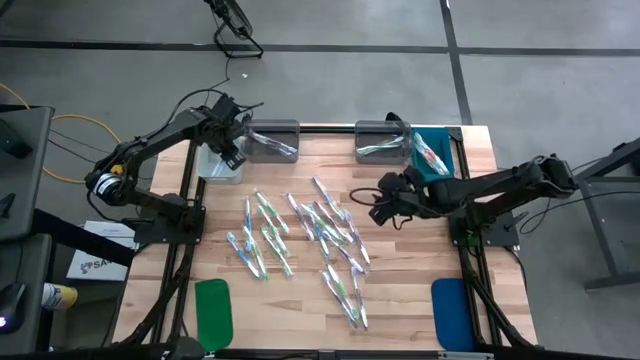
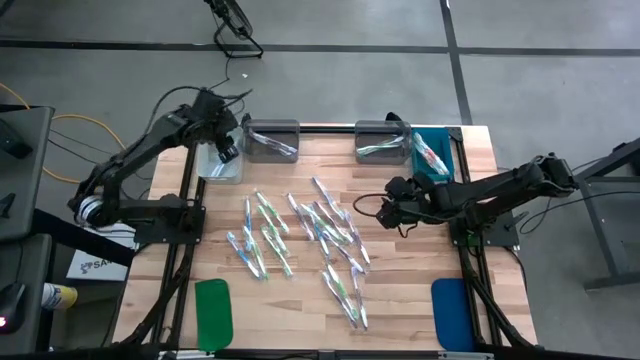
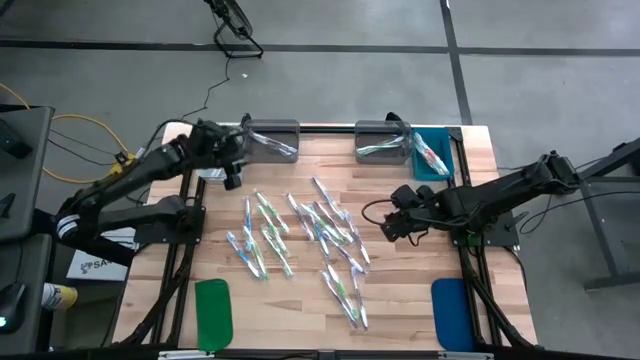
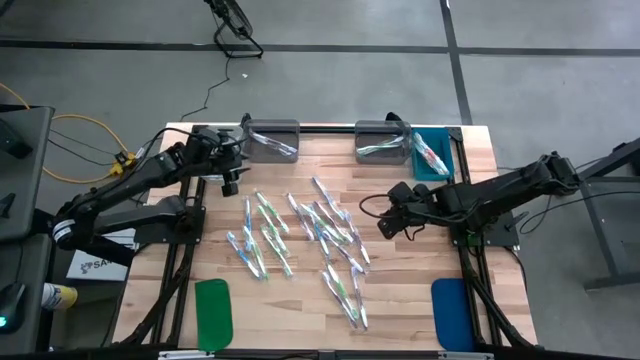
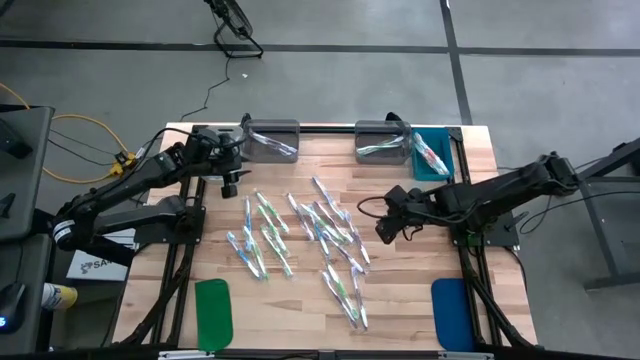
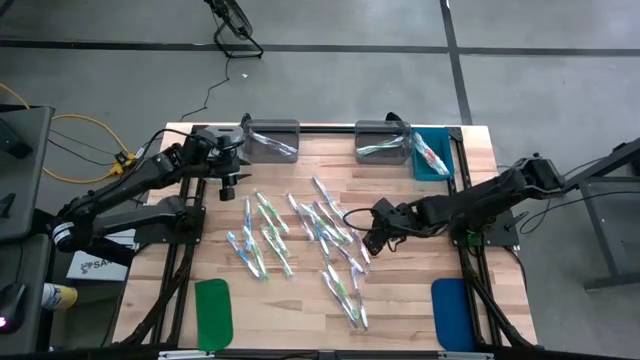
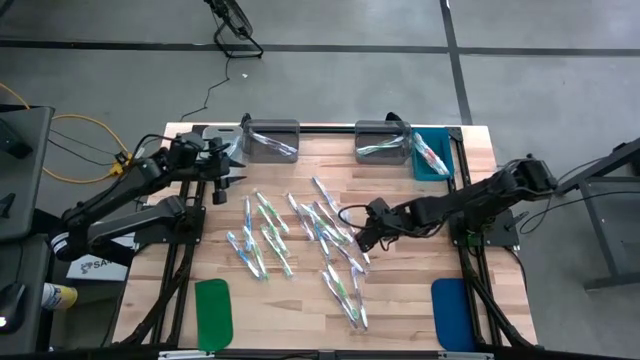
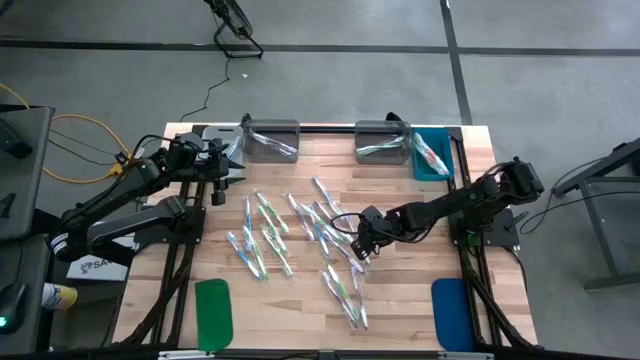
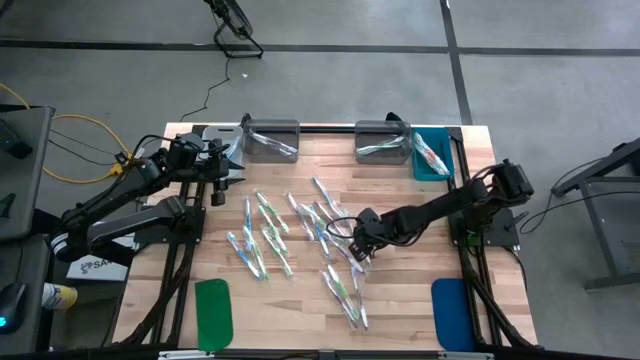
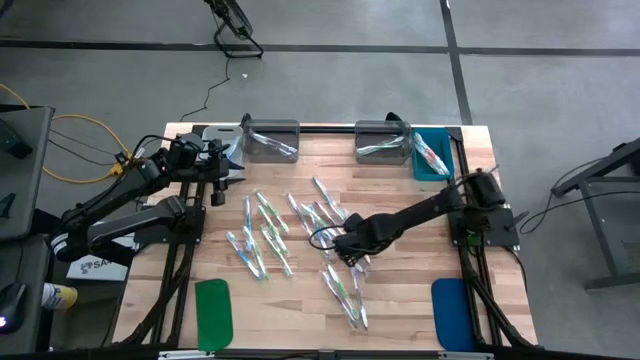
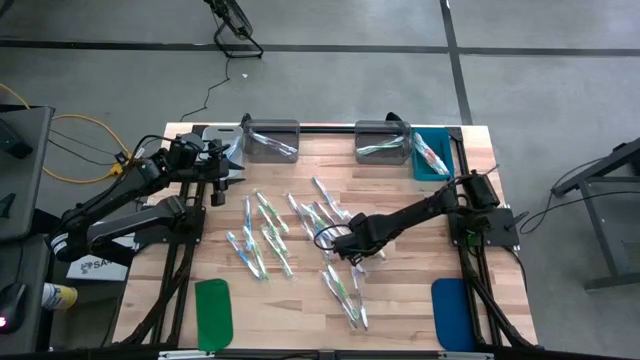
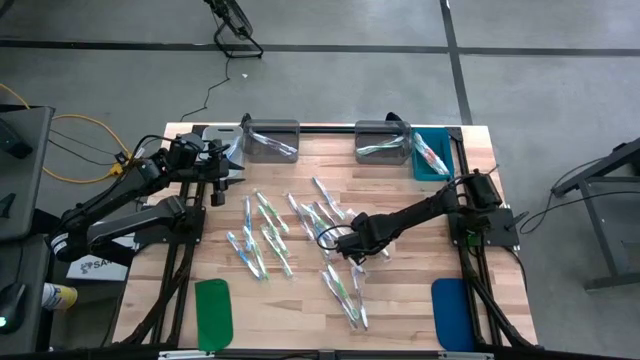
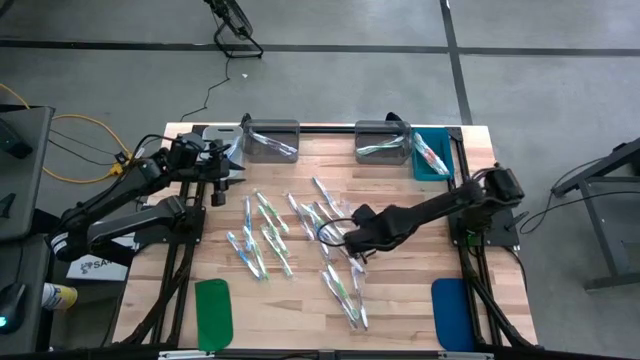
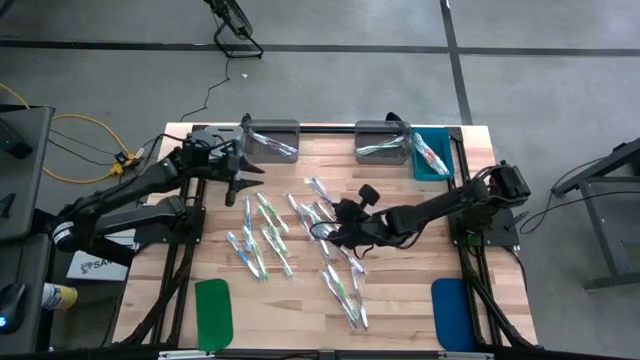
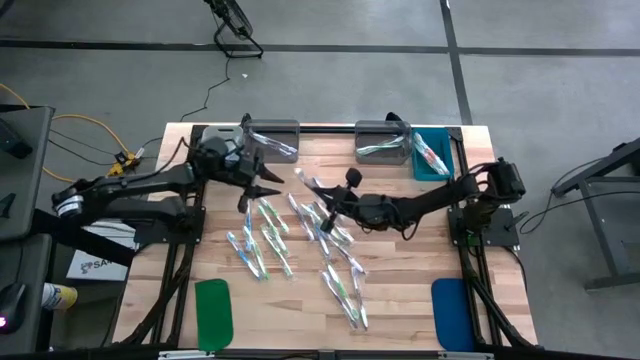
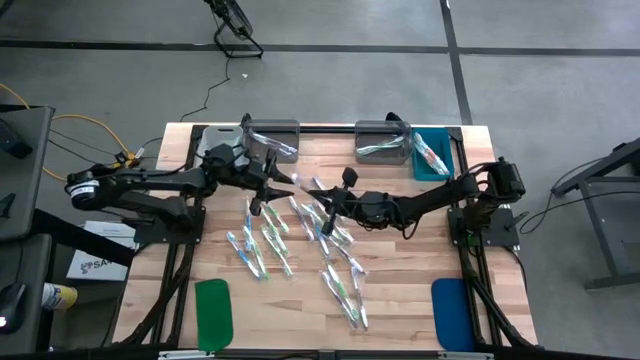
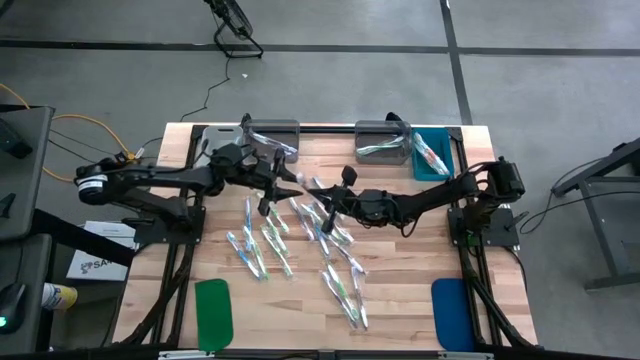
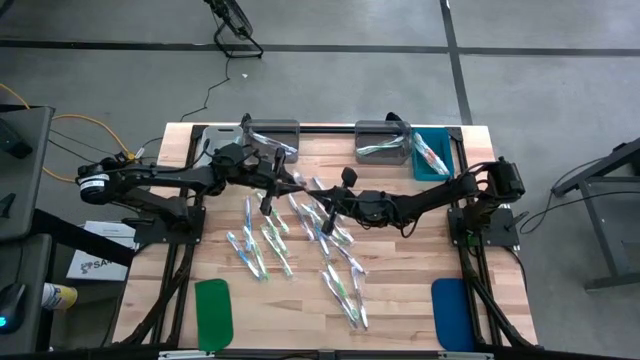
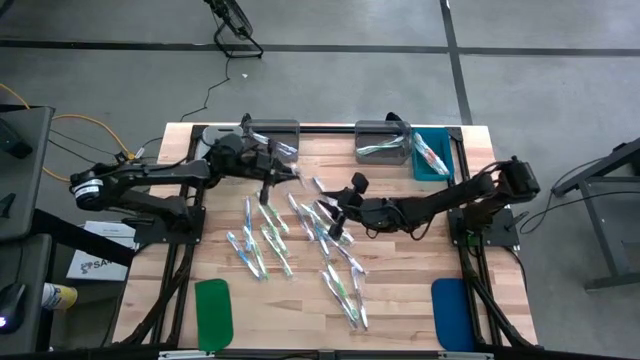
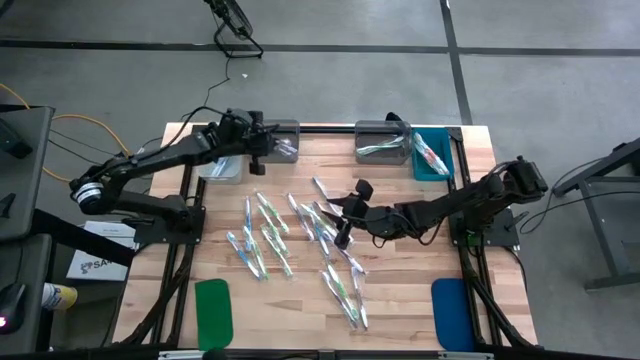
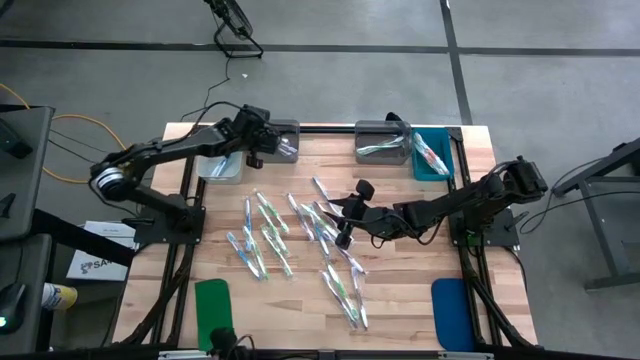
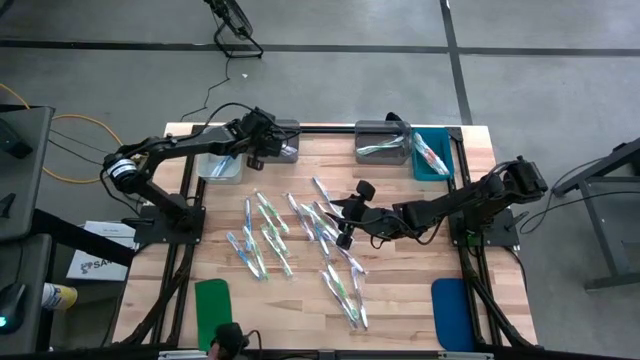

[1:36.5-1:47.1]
Task: Pick & Place Toothbrushes
Put the violet toothbrush into the left black bin

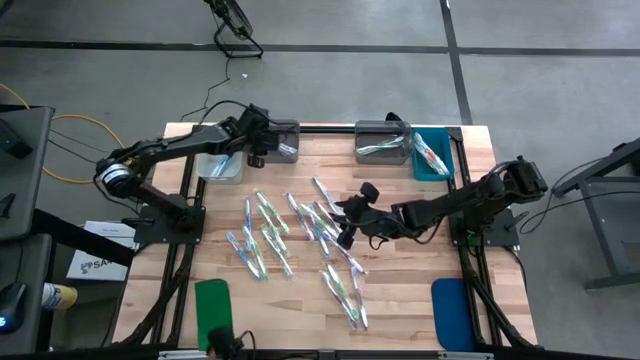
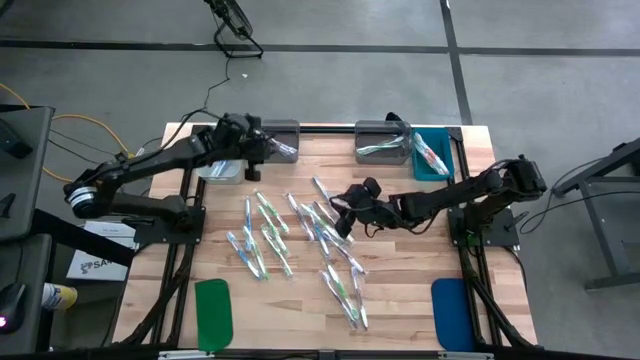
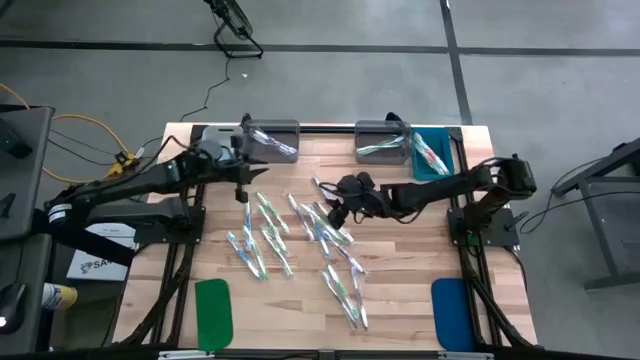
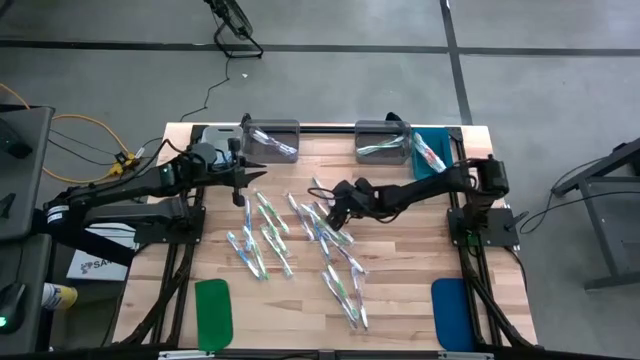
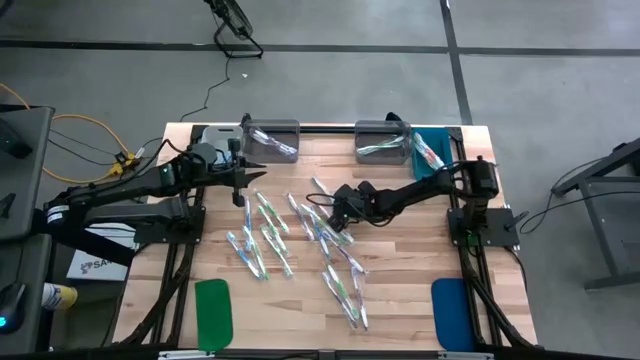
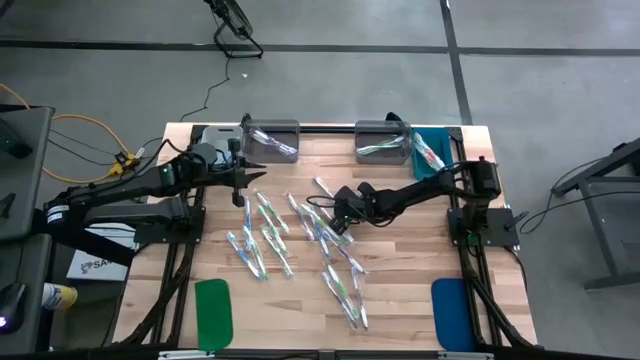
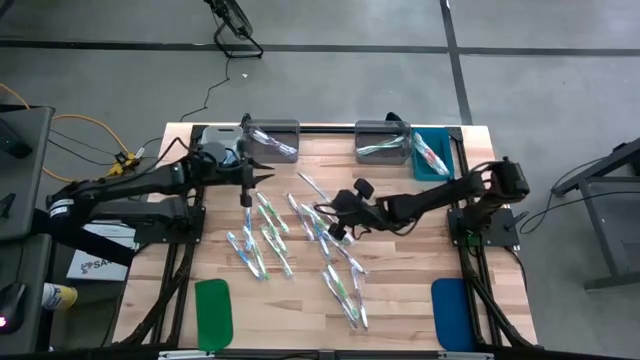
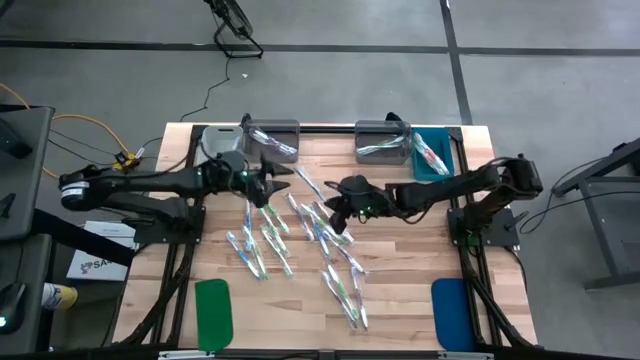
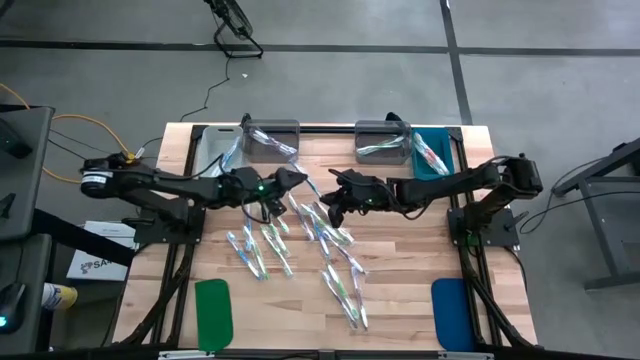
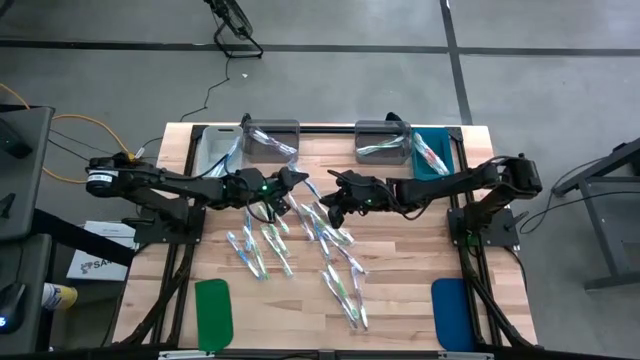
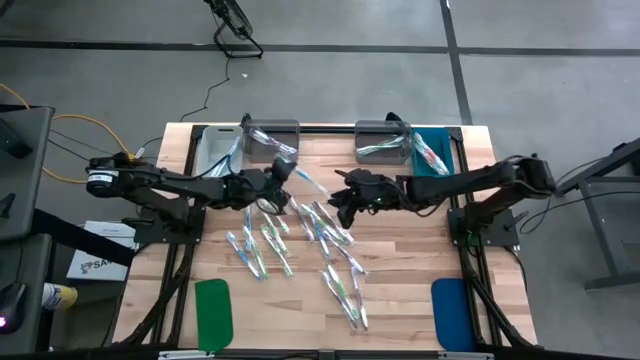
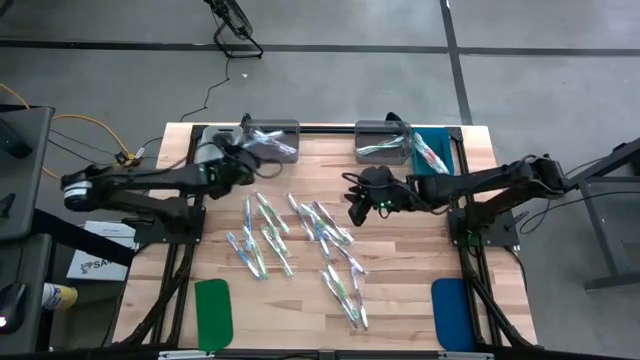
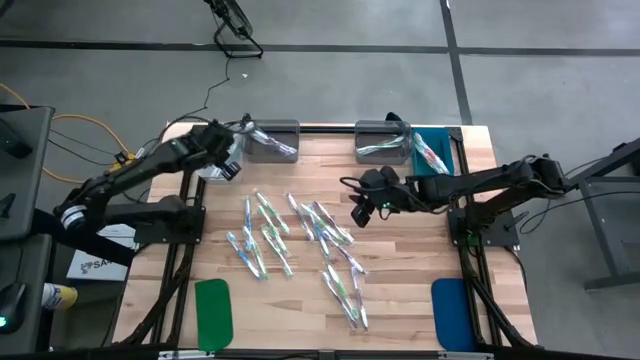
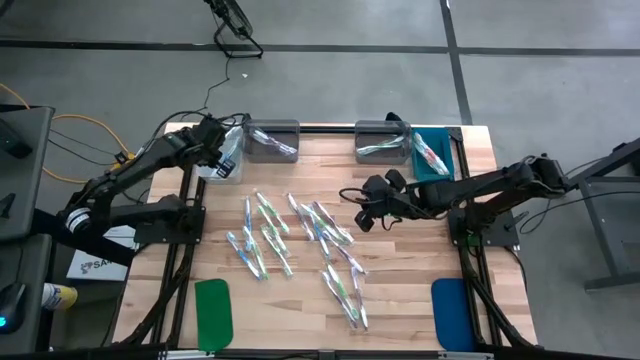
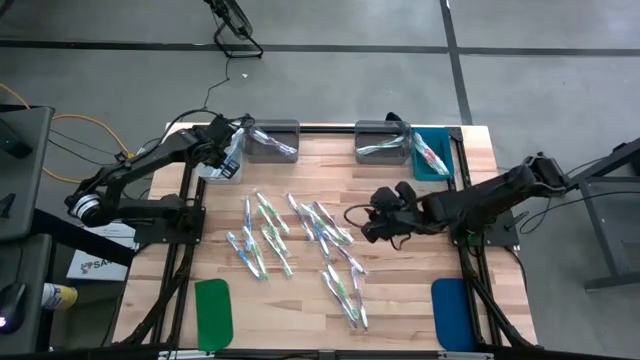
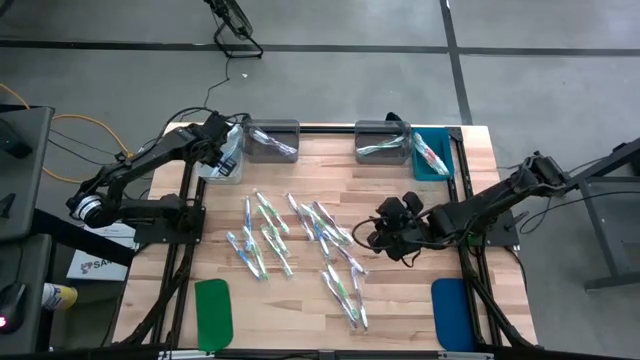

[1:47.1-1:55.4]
Put the blue toothbrush into the white bin

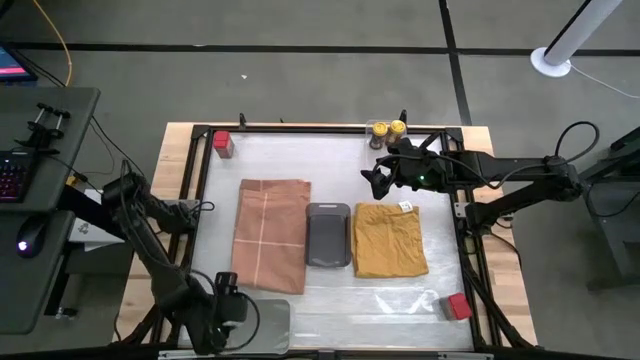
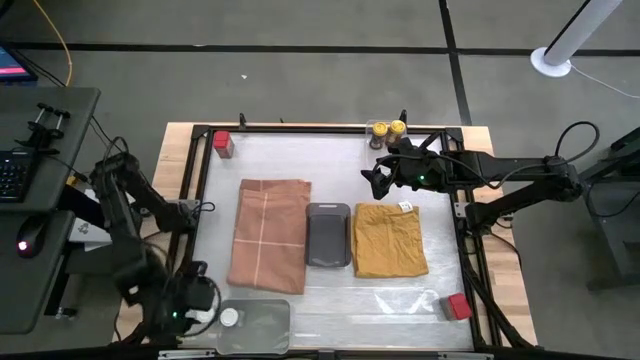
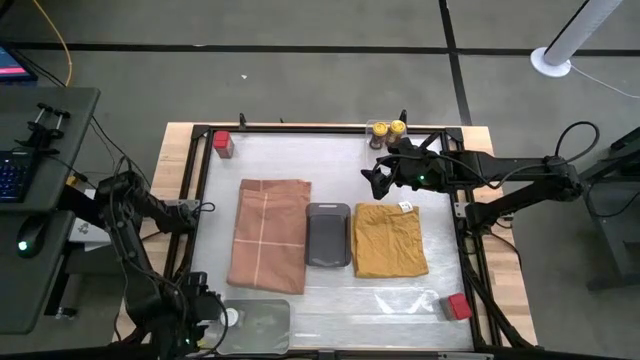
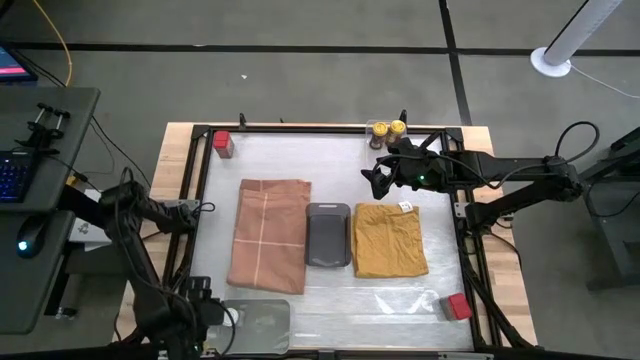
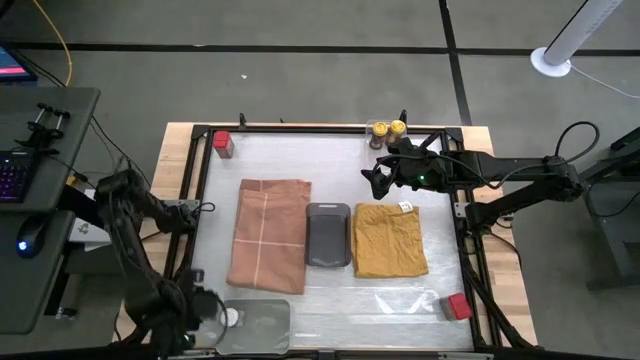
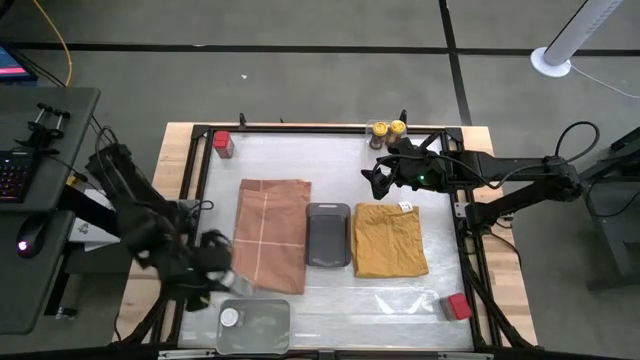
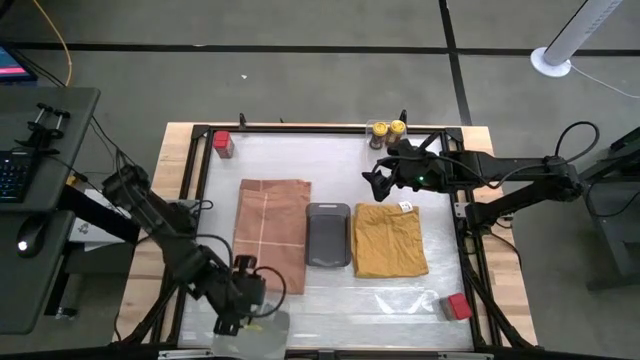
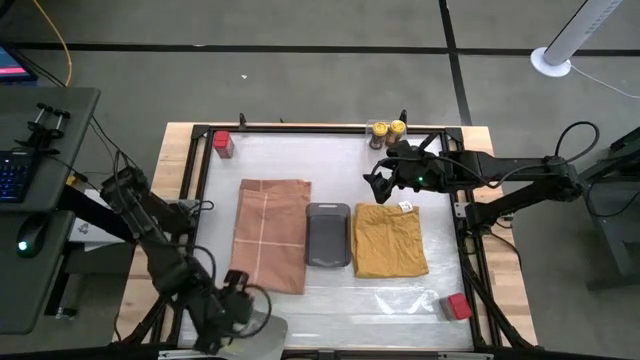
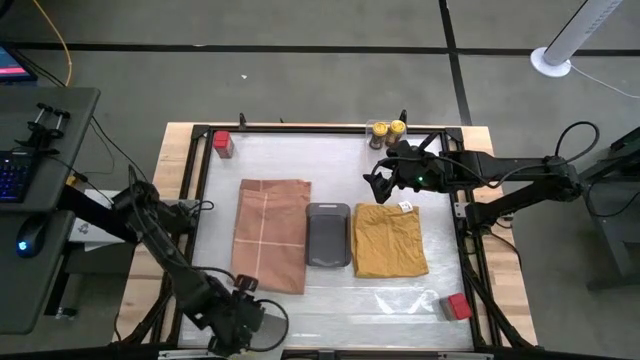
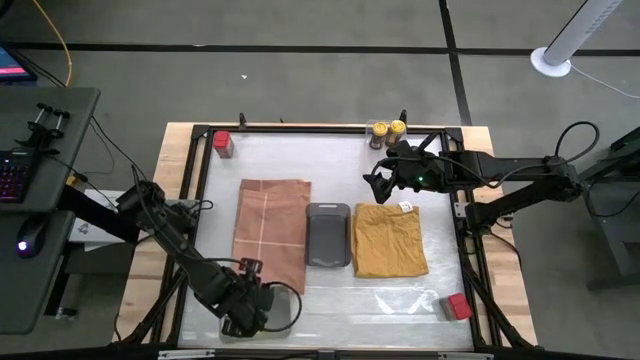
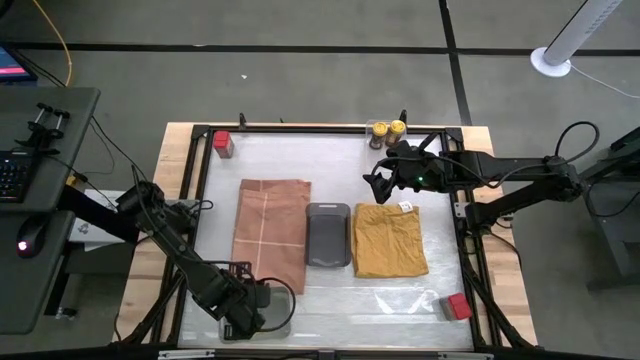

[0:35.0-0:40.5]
Task: Sort spices by type
Put the white seasoning bottle into the white bin
